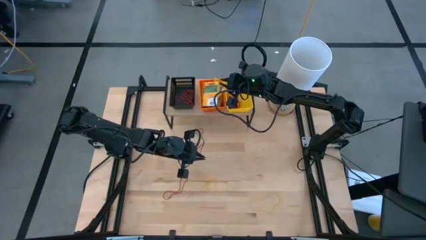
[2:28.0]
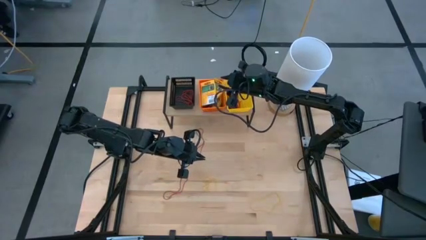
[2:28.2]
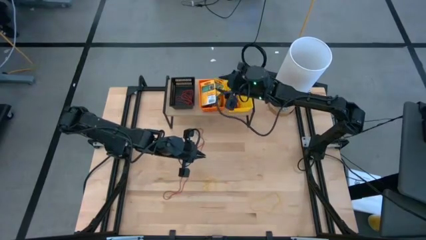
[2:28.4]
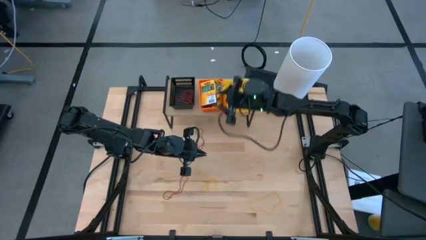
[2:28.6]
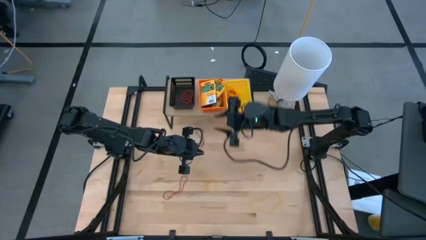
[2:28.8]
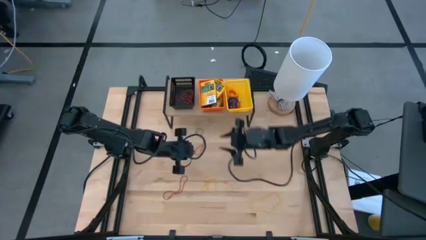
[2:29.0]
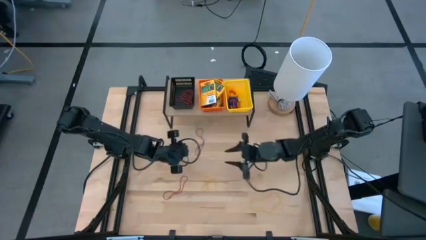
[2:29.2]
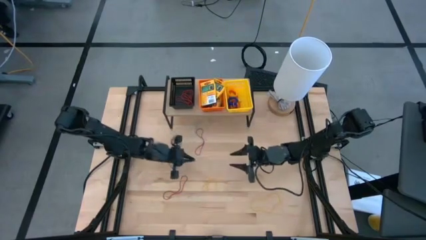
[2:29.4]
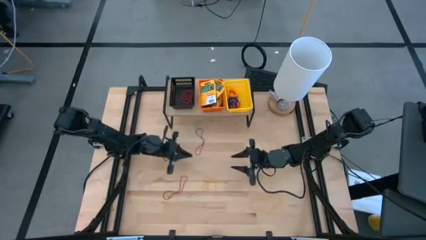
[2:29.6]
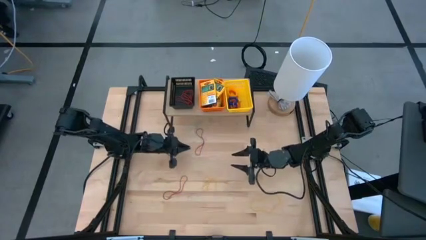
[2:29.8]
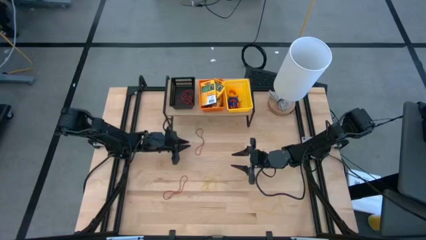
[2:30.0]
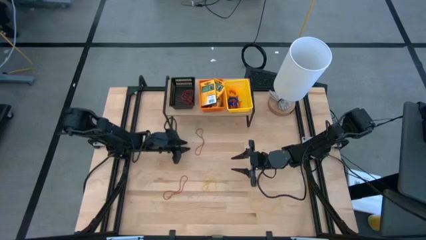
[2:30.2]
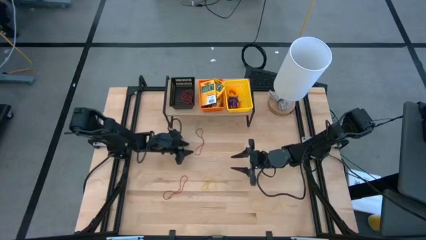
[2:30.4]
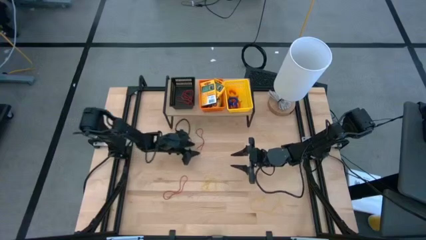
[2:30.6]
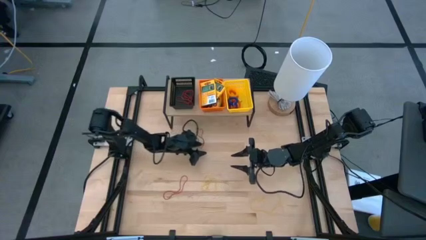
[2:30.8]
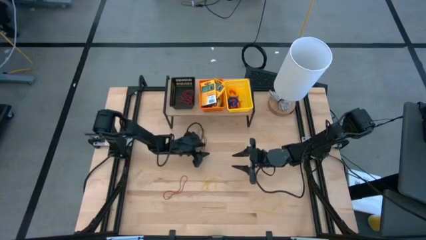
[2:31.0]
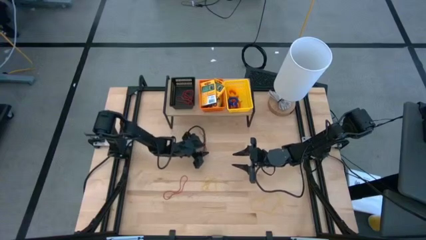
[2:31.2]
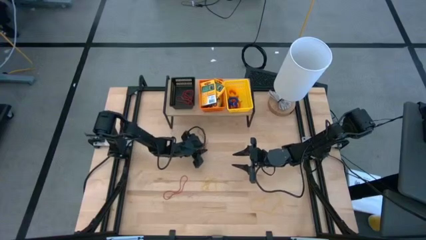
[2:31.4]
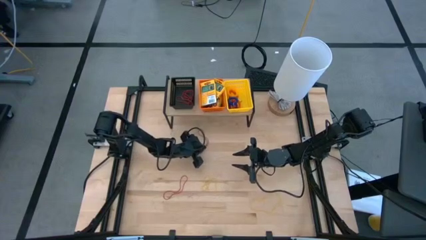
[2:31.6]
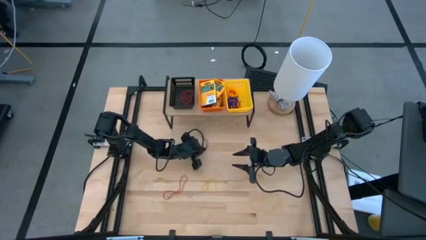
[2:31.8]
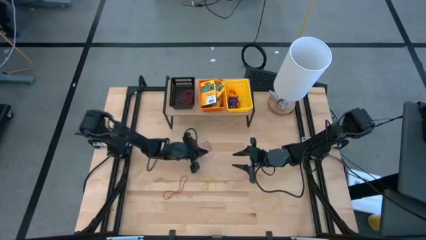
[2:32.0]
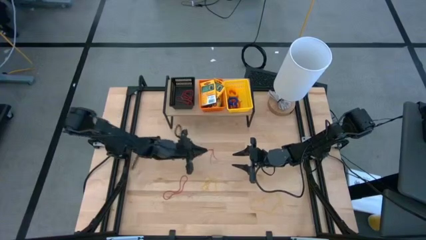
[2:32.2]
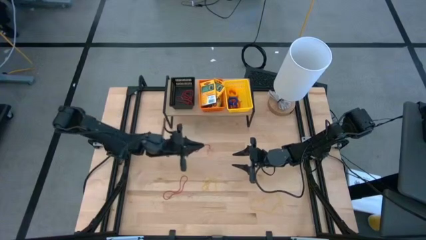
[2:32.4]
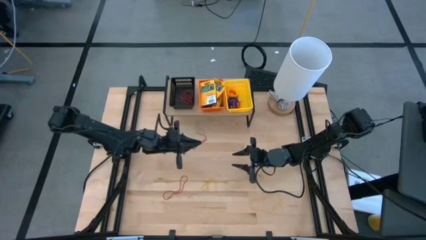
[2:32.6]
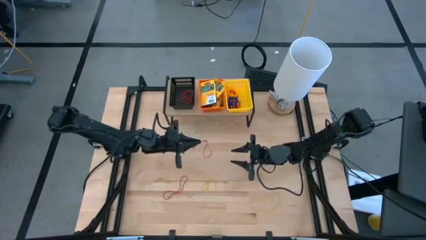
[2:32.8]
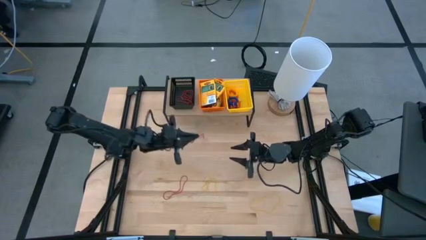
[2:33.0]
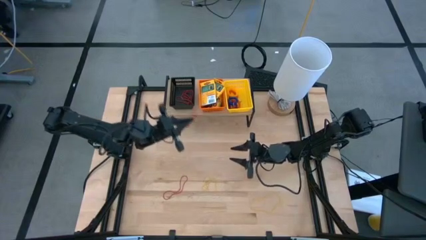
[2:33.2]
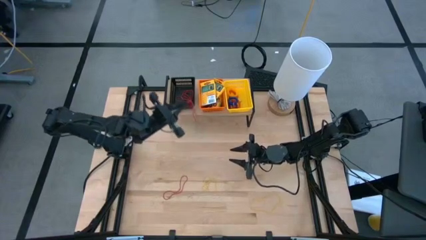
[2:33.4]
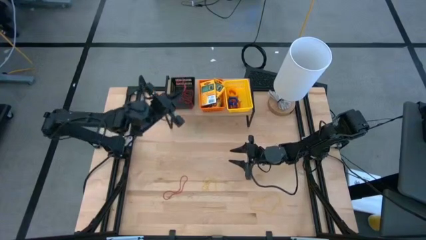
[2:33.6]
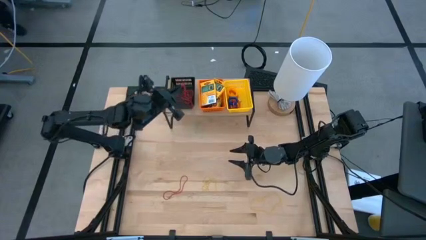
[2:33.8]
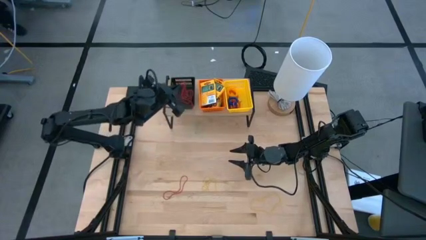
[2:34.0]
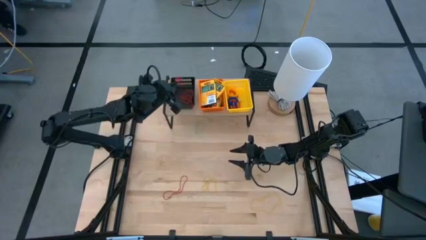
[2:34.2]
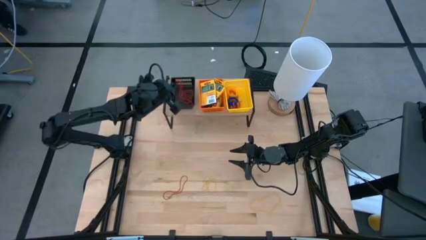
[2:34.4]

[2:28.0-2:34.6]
Task: Pick & Place Office Desk Supplies
Put the red rubberband into the black bin on the shelf

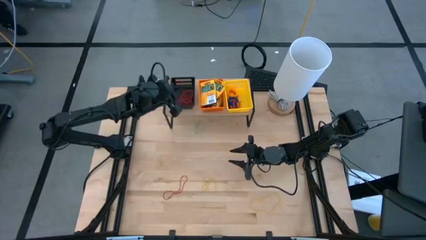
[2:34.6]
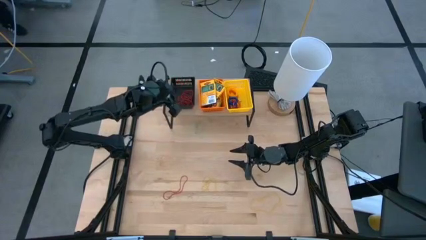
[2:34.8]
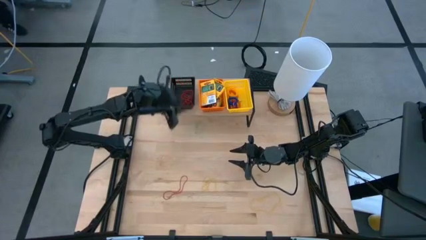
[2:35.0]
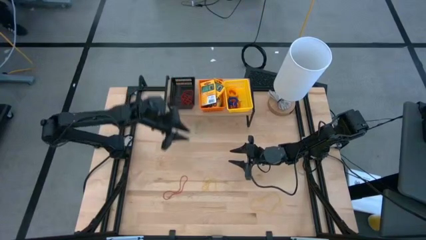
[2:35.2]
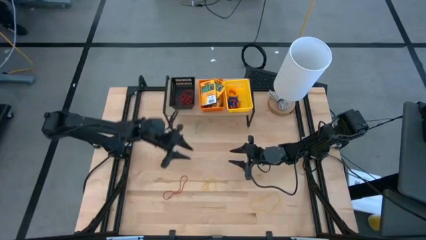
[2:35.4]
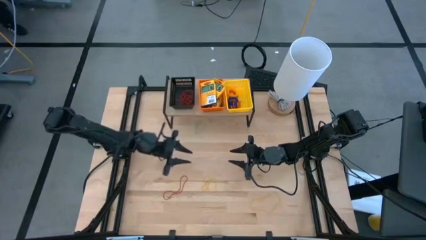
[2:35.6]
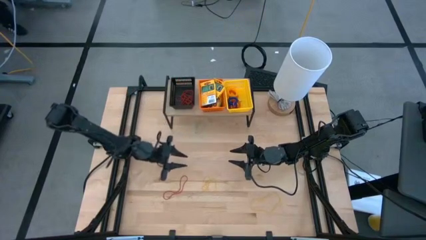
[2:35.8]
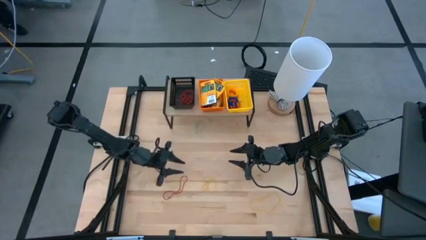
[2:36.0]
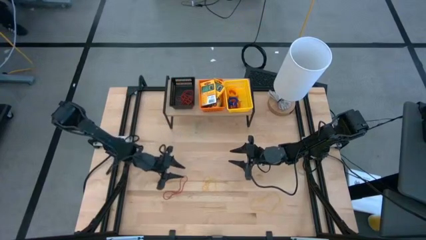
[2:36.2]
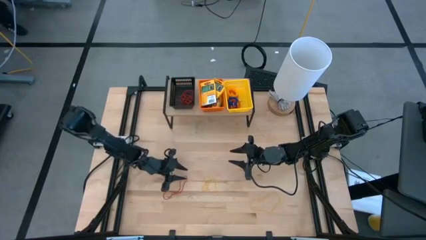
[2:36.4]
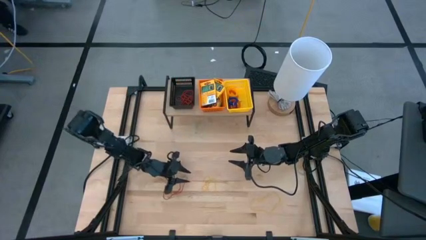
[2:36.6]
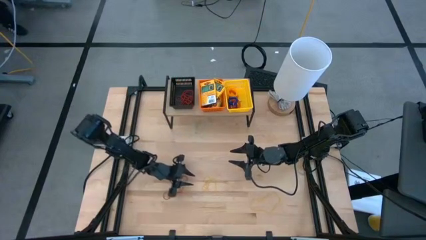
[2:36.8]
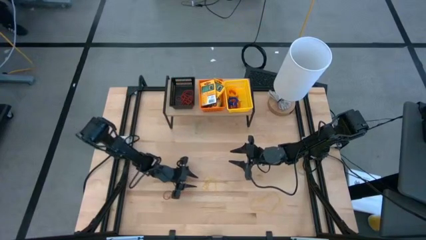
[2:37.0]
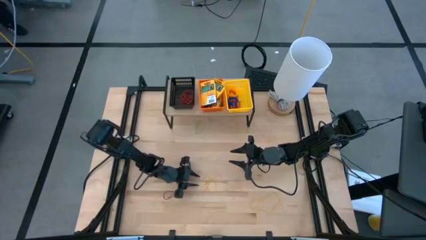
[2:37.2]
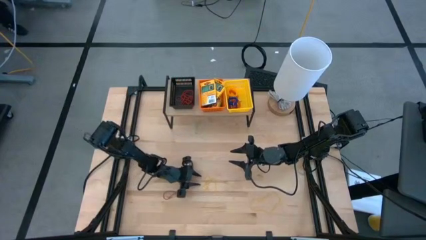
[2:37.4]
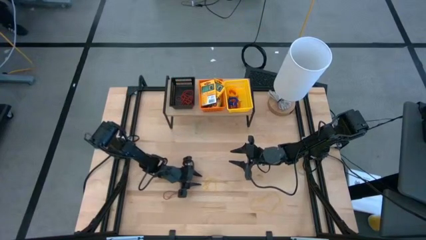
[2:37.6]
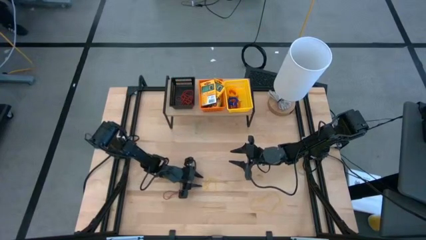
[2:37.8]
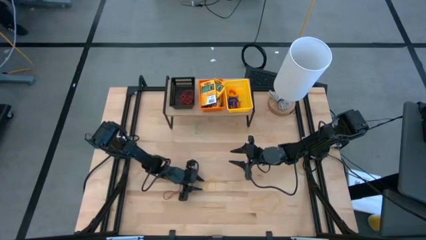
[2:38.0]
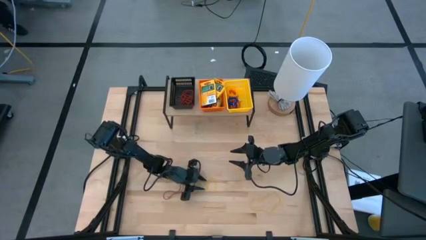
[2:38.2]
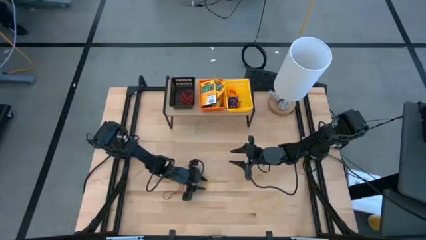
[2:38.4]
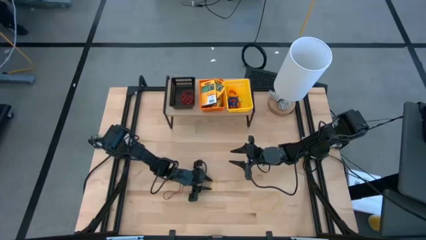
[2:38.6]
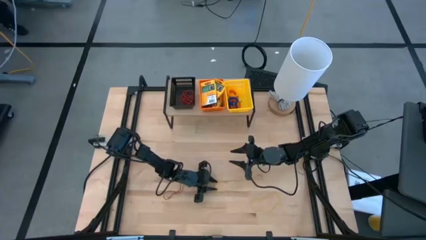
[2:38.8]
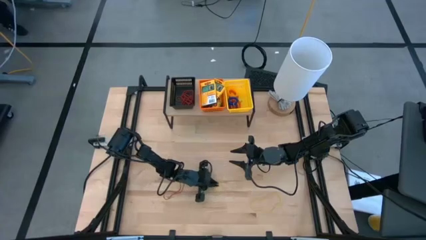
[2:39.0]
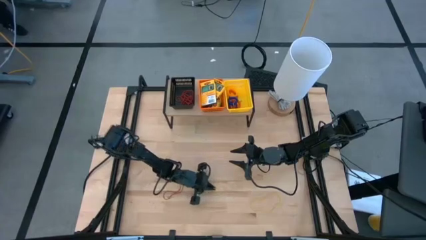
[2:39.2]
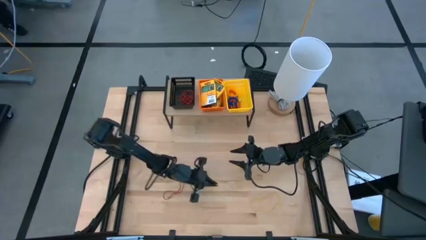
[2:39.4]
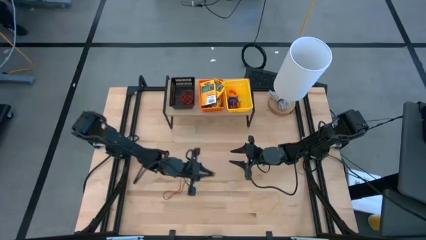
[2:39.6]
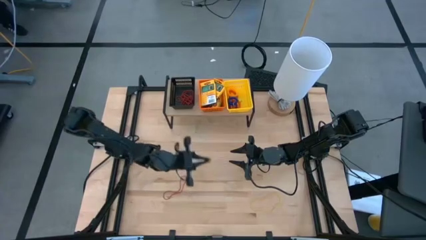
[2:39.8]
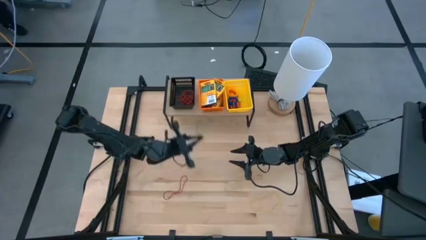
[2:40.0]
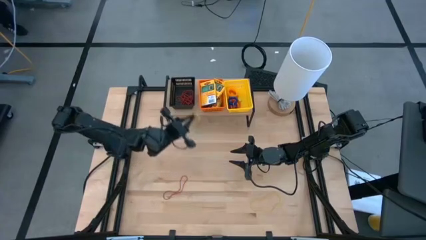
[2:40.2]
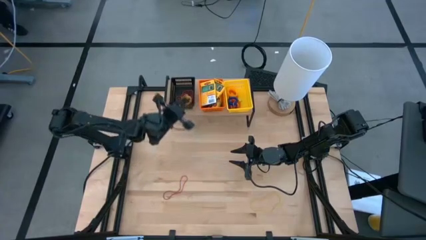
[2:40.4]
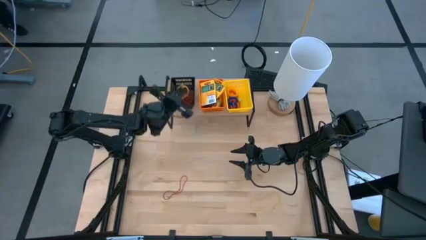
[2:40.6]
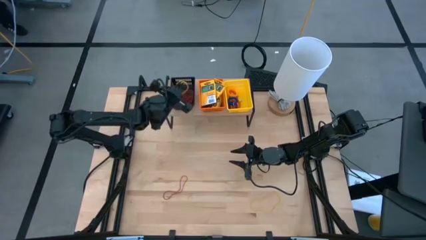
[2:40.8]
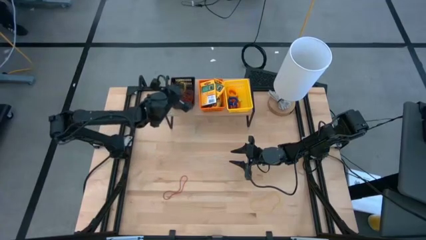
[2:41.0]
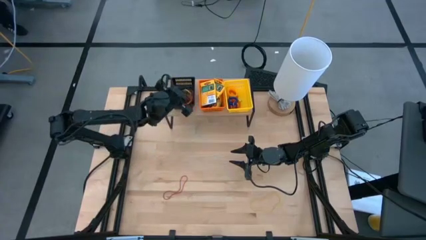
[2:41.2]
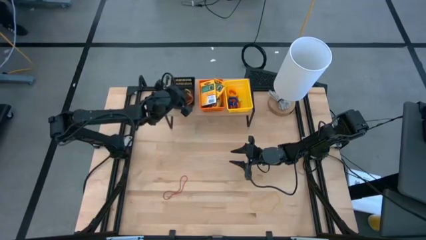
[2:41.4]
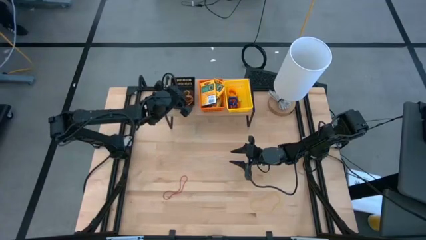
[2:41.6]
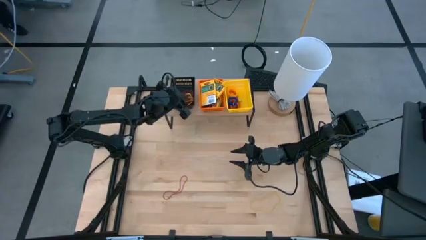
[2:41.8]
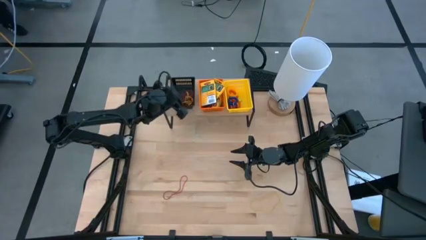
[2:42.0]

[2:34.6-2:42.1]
Put the yellow rubberband into the black bin on the shelf
